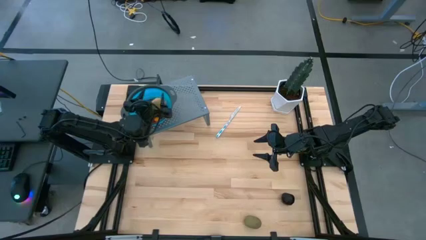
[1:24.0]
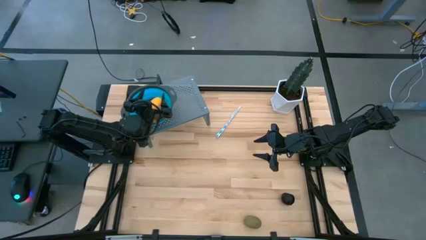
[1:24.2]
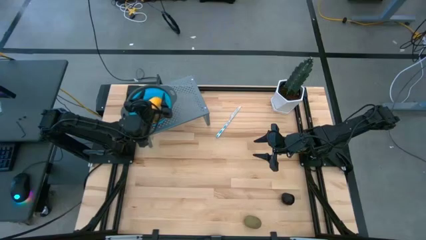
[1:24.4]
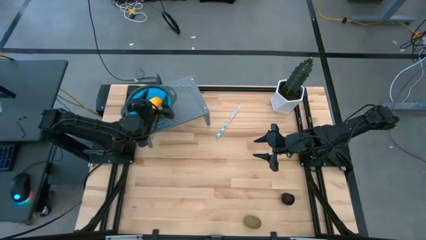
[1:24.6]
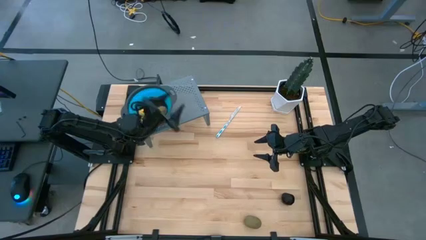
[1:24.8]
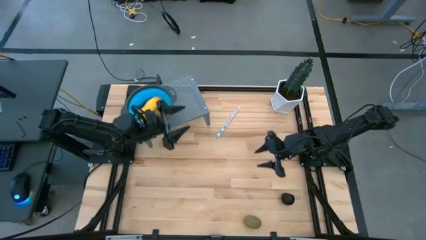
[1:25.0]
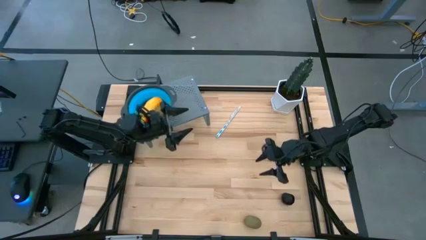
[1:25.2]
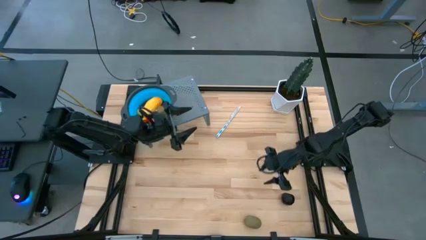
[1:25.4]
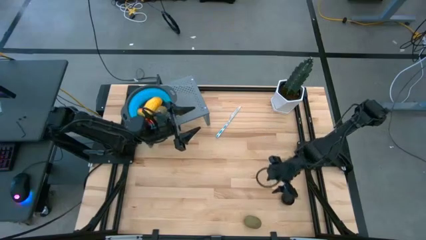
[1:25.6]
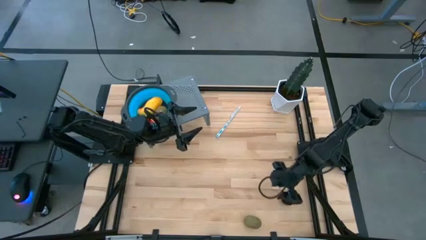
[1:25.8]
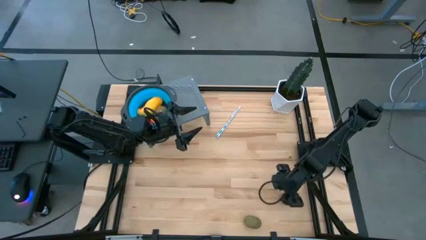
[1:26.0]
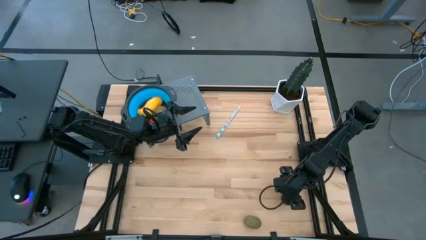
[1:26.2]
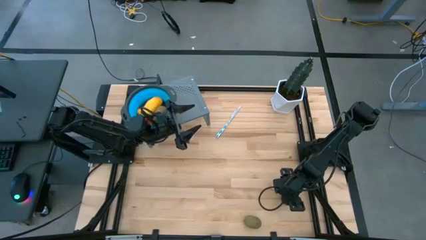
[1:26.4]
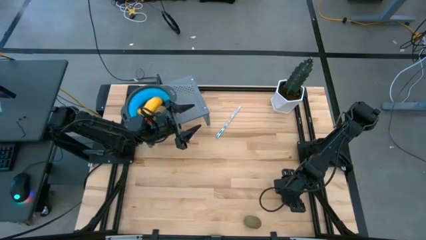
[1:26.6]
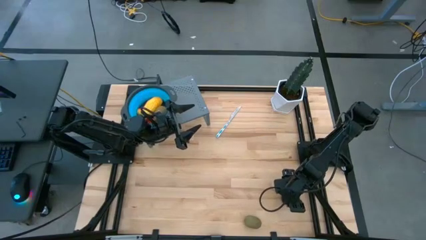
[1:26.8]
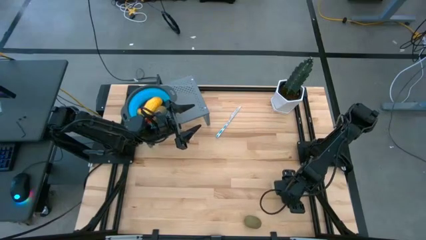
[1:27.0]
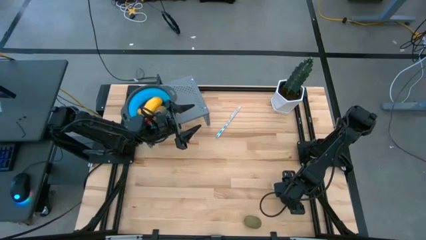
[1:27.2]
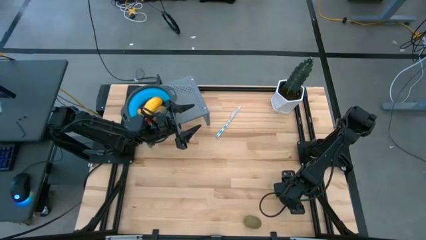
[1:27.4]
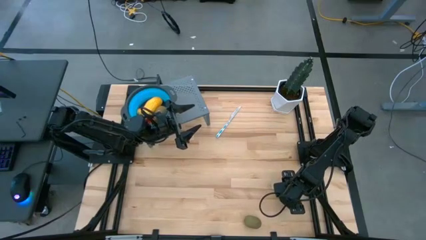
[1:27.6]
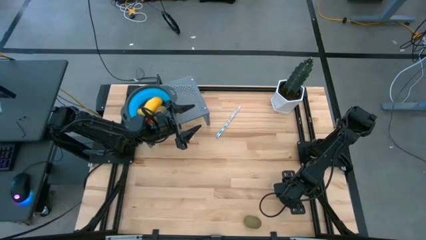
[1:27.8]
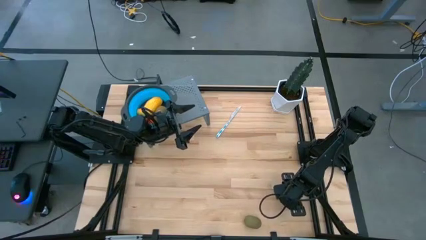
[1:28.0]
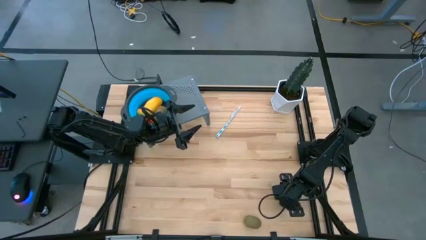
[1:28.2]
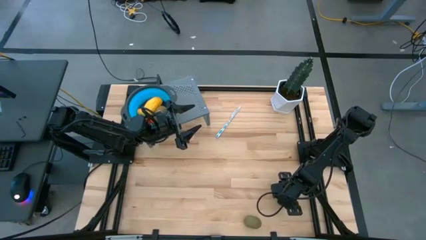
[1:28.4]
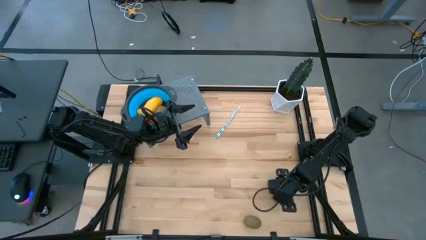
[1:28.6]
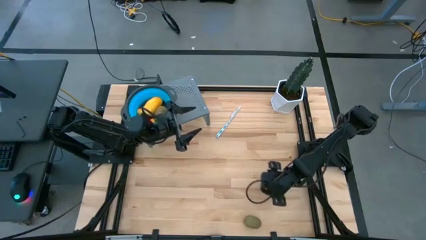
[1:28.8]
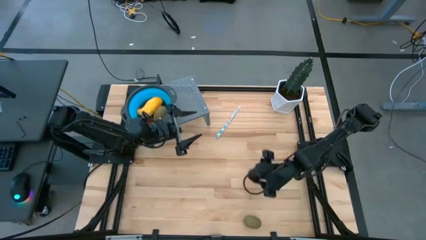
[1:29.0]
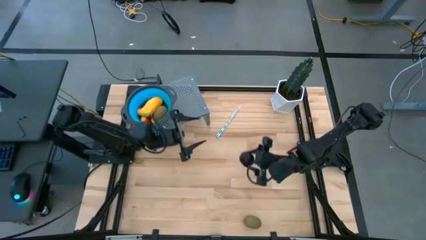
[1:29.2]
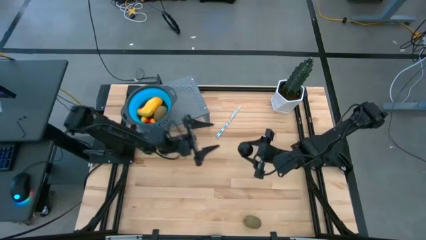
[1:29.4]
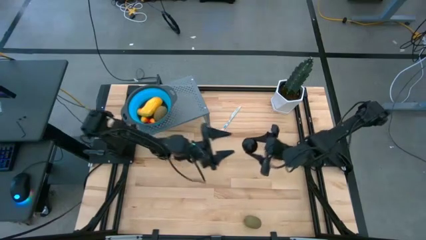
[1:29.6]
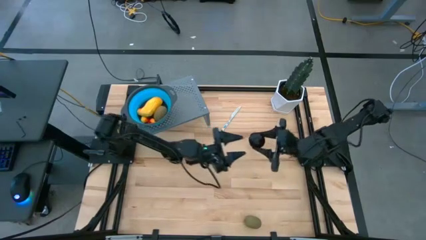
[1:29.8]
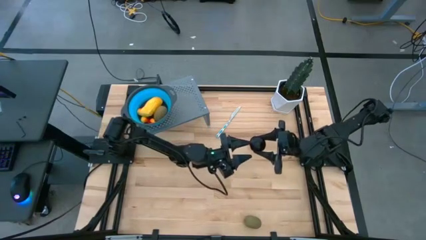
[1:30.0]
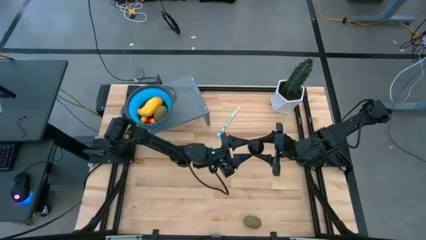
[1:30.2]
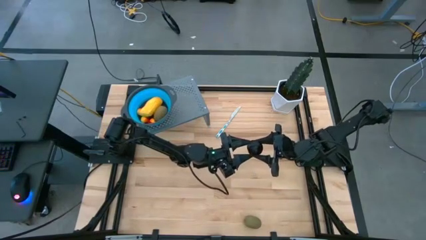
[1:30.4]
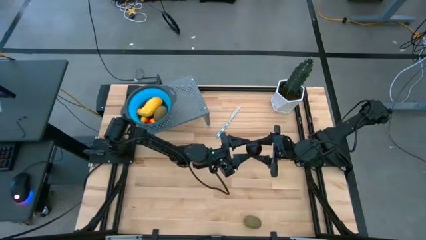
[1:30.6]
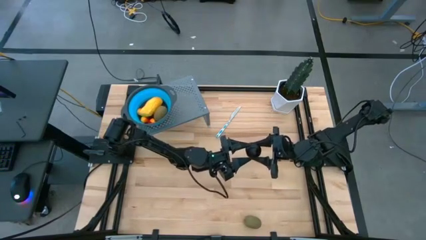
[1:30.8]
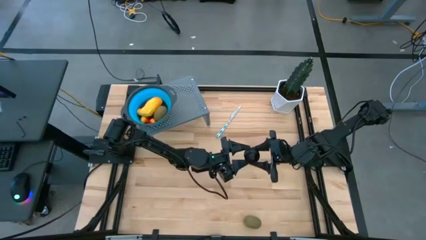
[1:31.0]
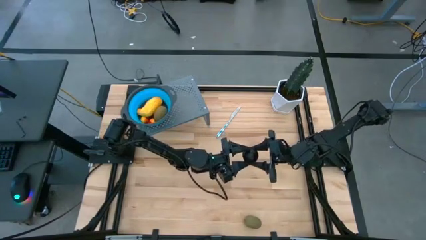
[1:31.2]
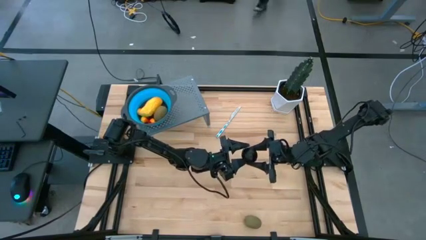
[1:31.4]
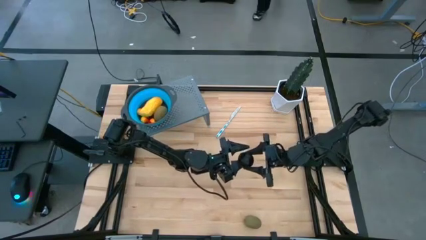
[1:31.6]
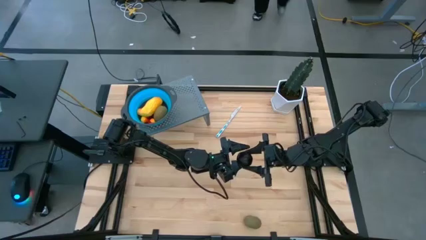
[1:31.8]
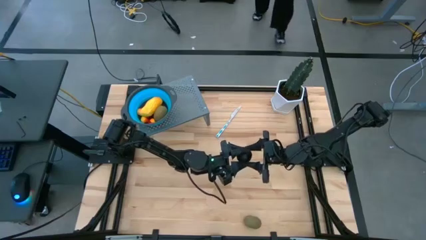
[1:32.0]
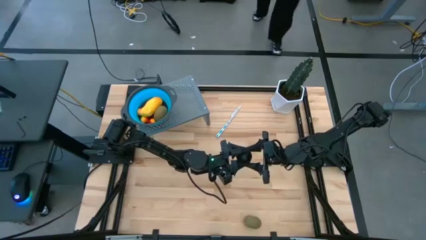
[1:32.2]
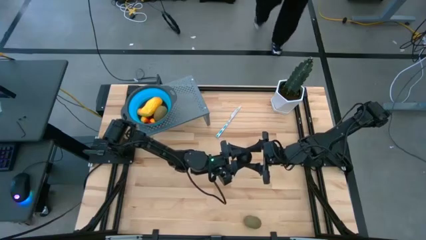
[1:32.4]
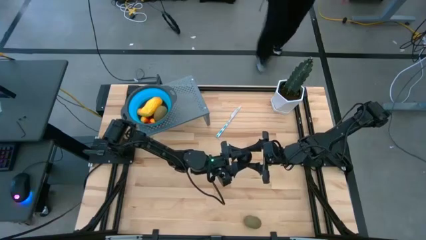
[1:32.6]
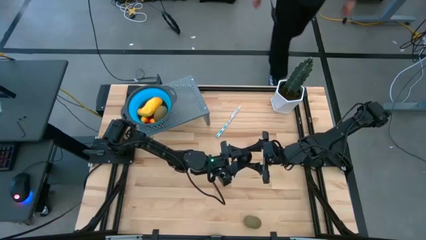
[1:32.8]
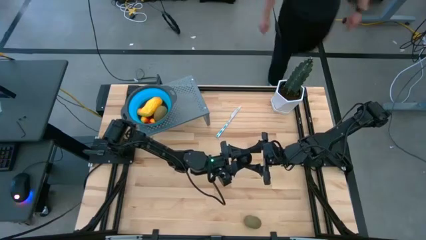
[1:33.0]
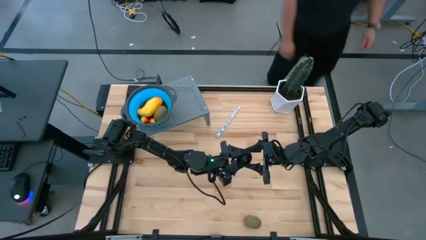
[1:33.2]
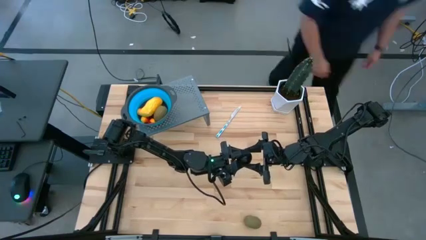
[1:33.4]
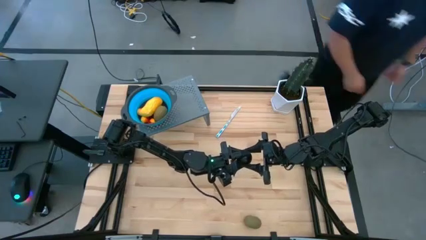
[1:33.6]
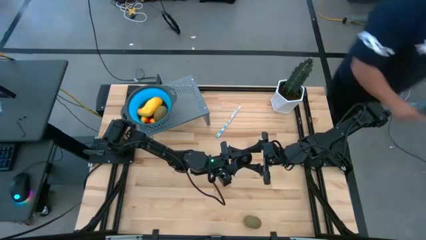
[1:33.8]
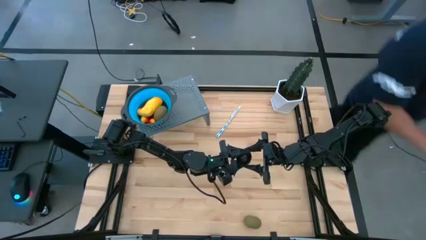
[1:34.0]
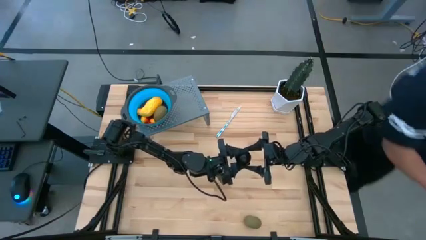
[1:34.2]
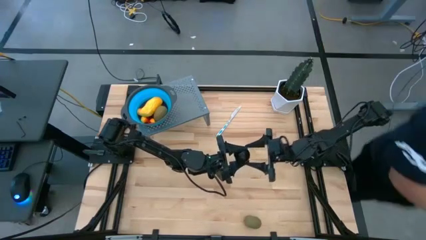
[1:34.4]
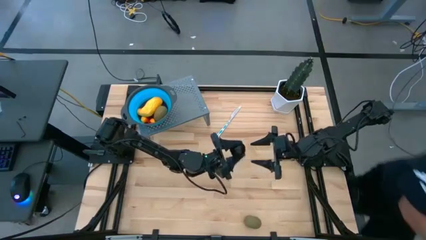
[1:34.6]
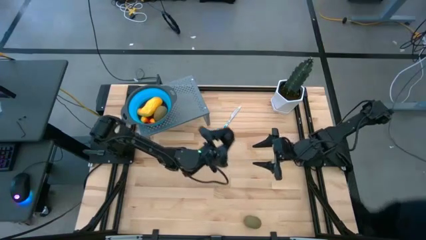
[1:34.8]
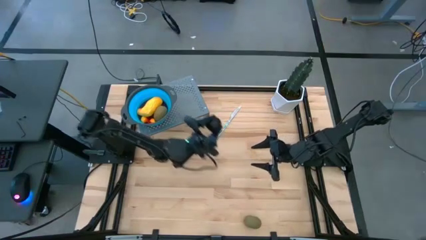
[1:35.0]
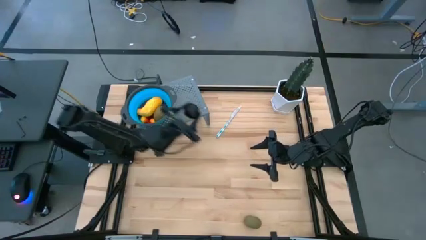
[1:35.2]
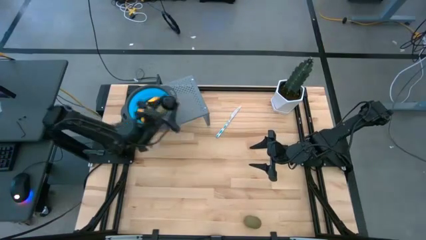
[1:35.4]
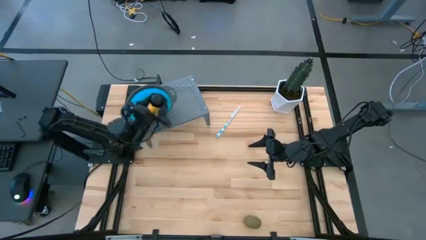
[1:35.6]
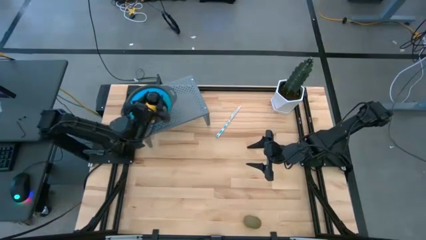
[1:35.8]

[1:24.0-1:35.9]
Task: Pick & Place Fruit
Put the black plum into the blue strainer bowl

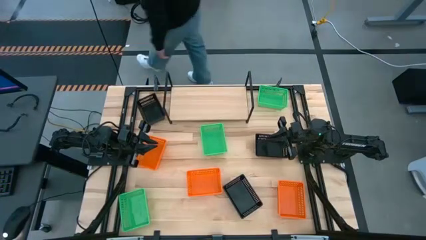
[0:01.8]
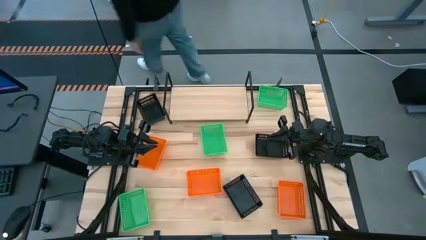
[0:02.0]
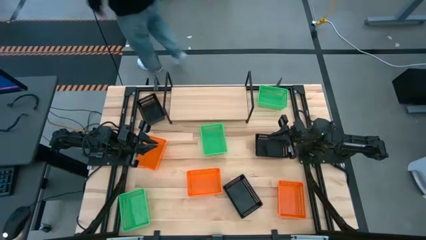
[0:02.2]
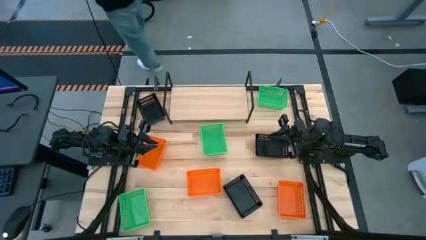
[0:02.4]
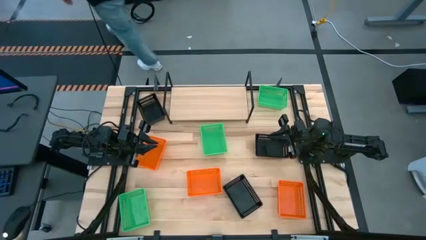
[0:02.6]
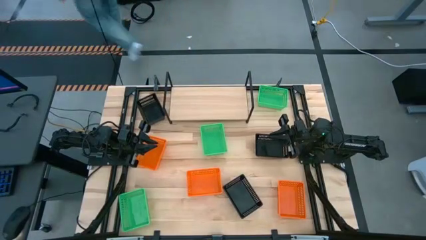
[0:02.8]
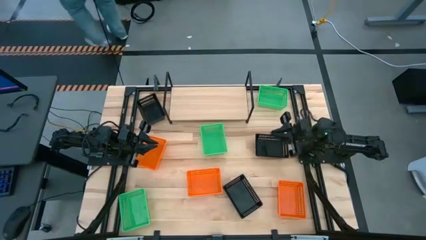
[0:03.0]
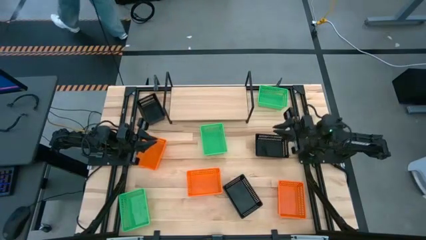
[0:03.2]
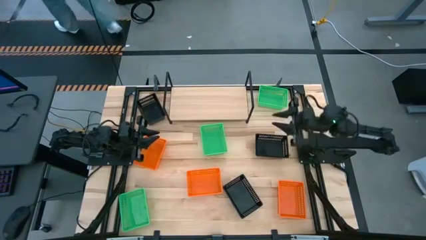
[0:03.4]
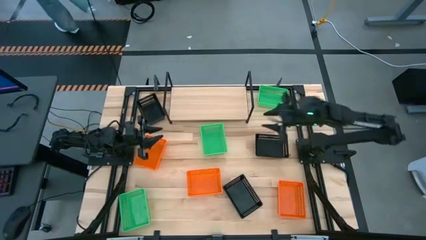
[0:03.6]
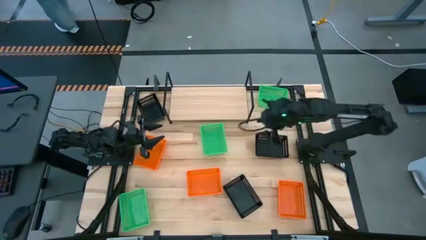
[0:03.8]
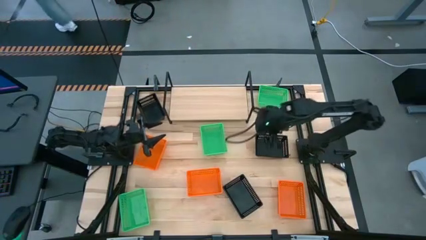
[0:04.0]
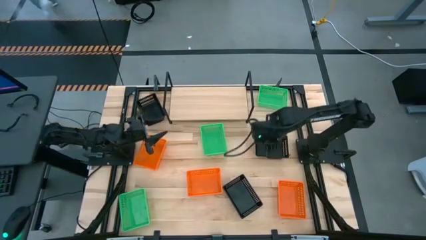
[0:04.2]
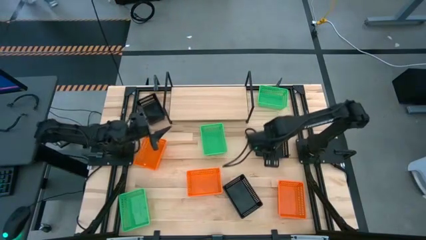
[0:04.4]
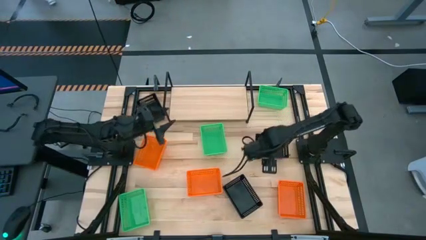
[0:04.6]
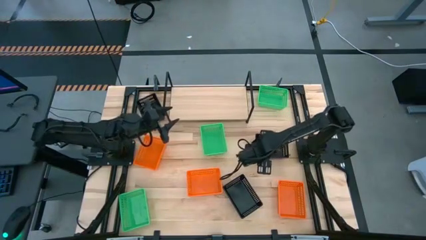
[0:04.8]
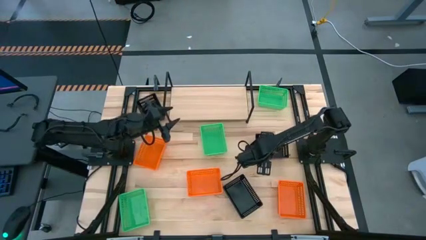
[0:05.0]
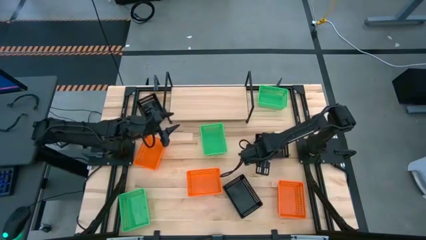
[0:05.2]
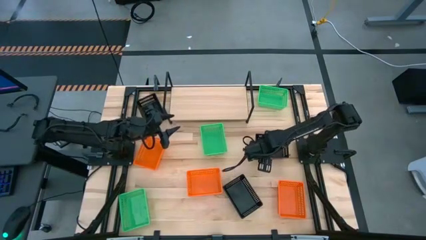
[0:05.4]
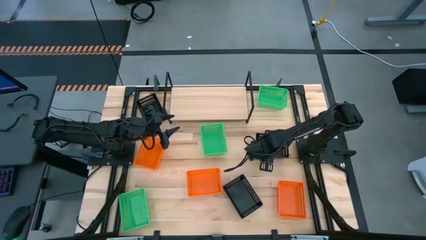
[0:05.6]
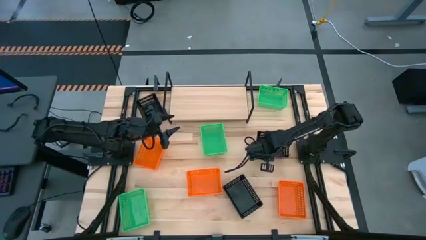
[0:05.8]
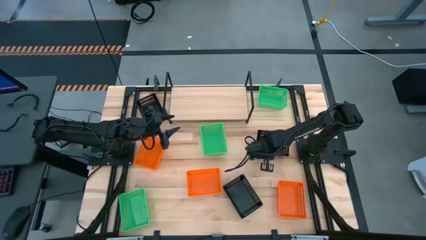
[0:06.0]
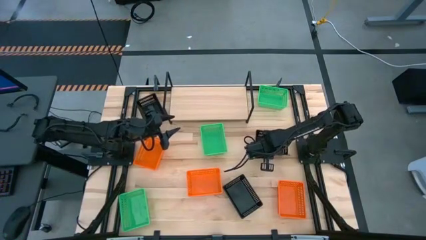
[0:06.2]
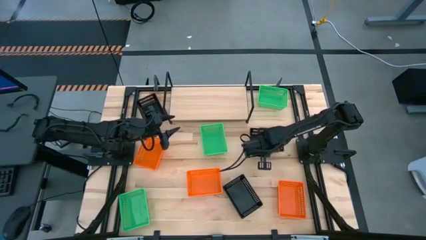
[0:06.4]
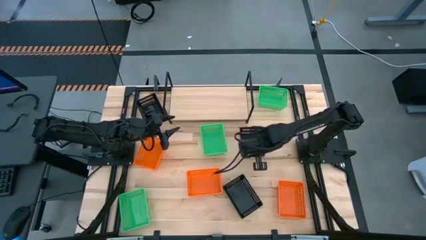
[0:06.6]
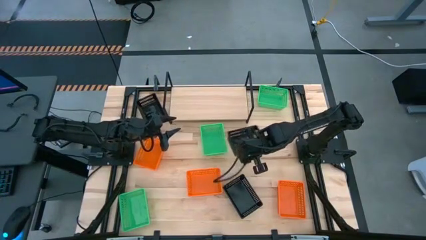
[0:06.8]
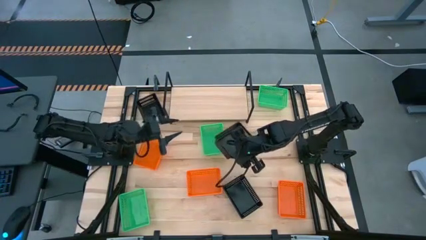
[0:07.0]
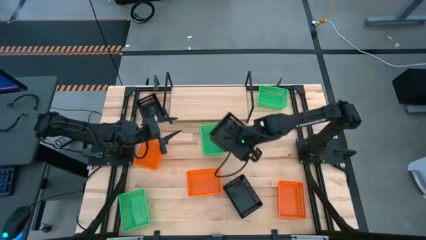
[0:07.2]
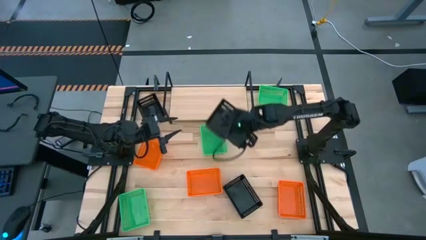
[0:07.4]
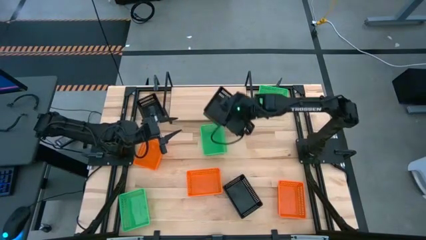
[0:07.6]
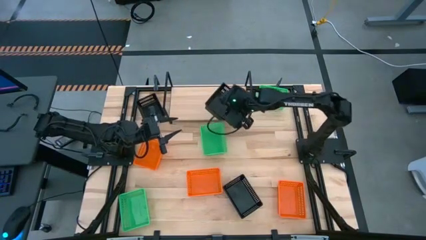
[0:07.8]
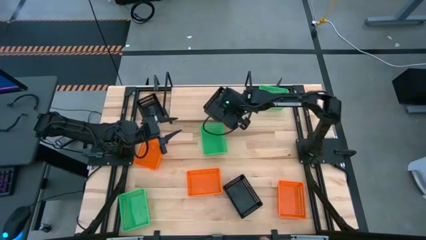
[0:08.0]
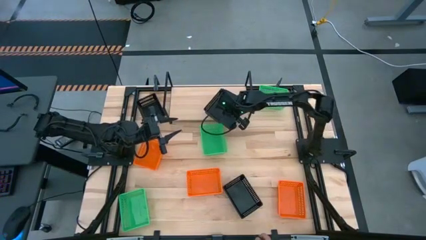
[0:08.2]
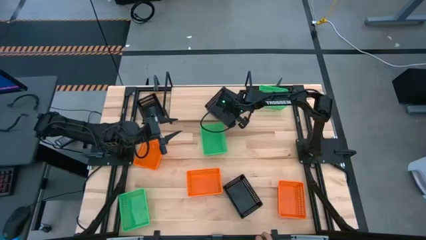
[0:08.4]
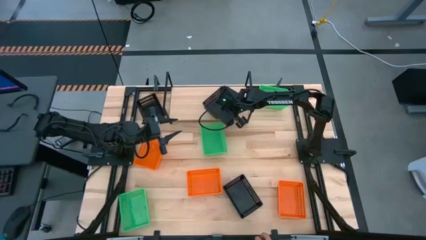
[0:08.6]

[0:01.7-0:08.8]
Task: Stack baskets on shelf by color
Put the middle black bin on the shelf
